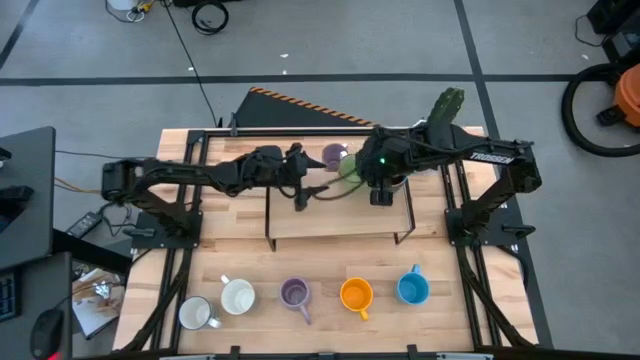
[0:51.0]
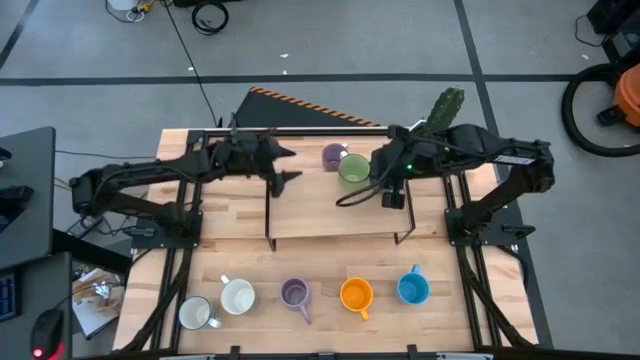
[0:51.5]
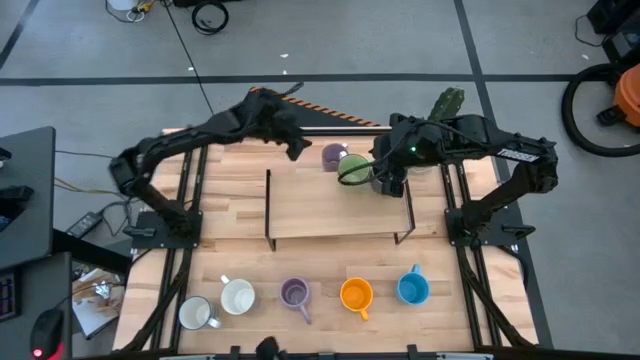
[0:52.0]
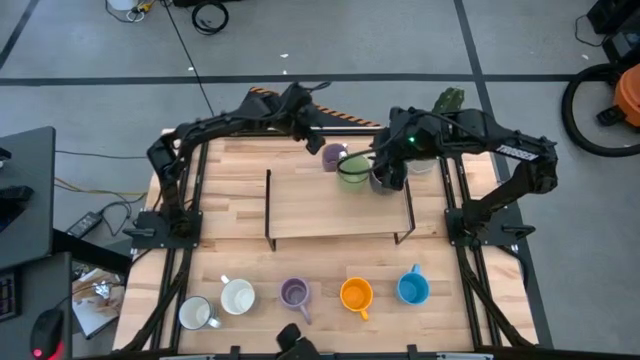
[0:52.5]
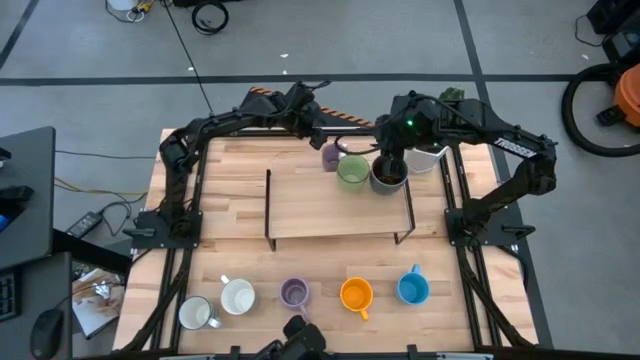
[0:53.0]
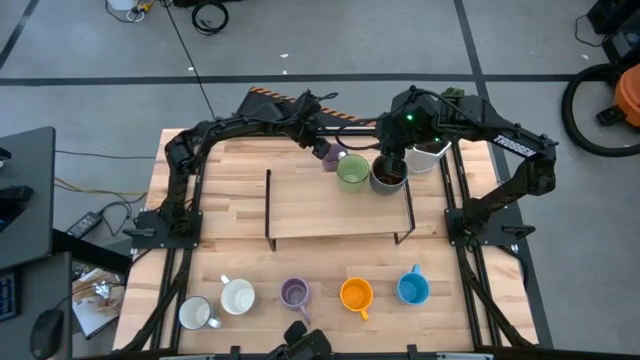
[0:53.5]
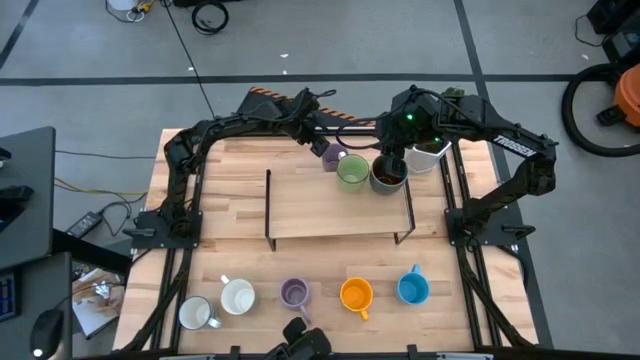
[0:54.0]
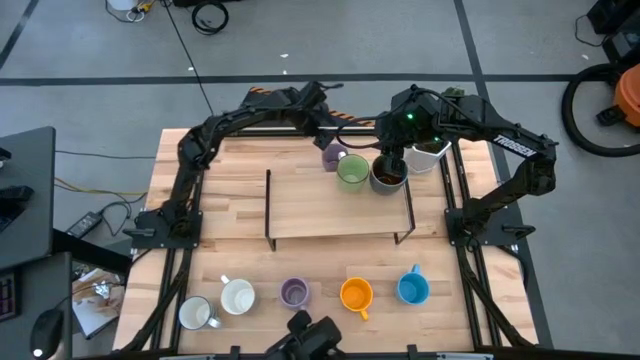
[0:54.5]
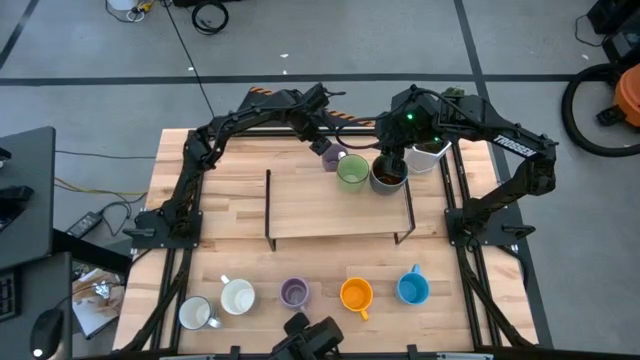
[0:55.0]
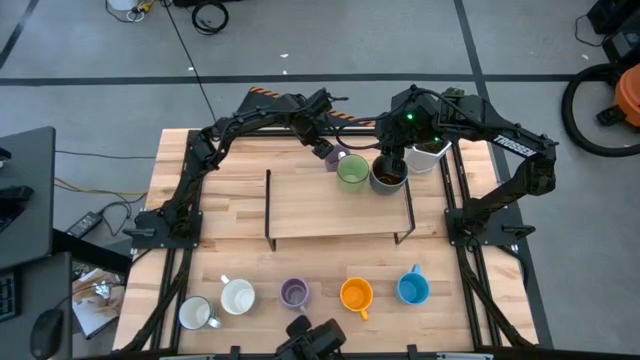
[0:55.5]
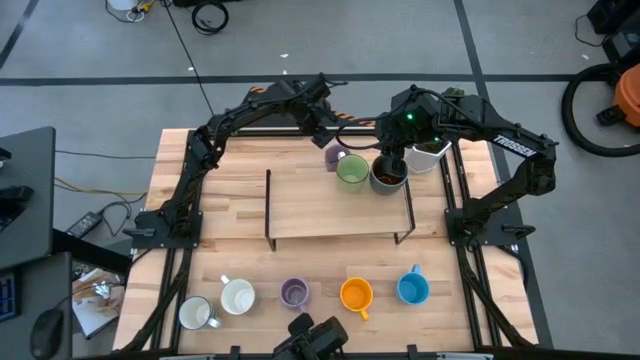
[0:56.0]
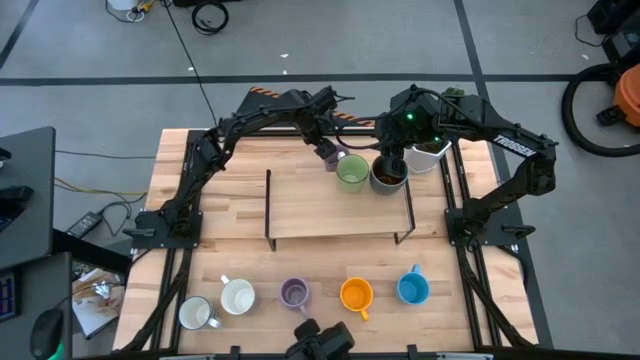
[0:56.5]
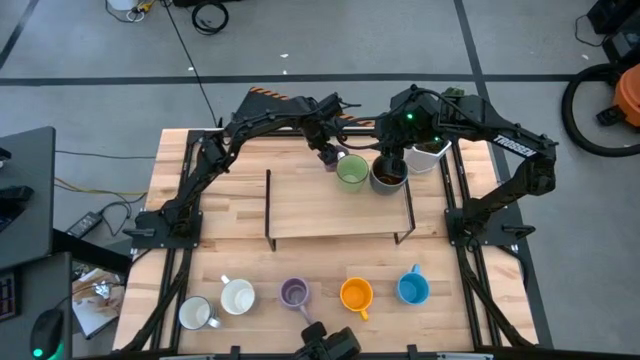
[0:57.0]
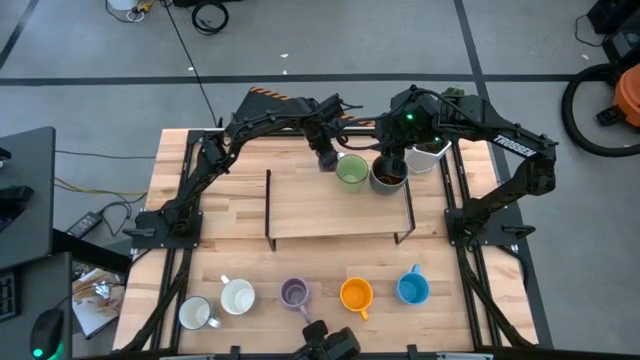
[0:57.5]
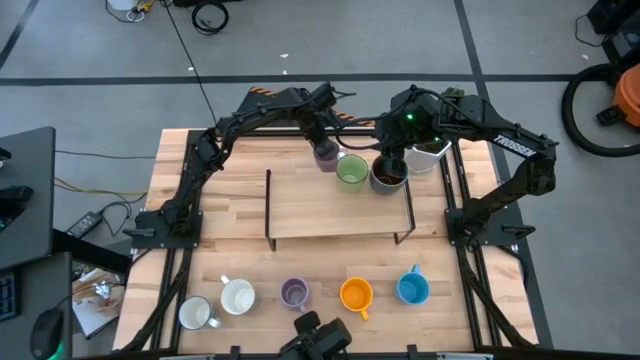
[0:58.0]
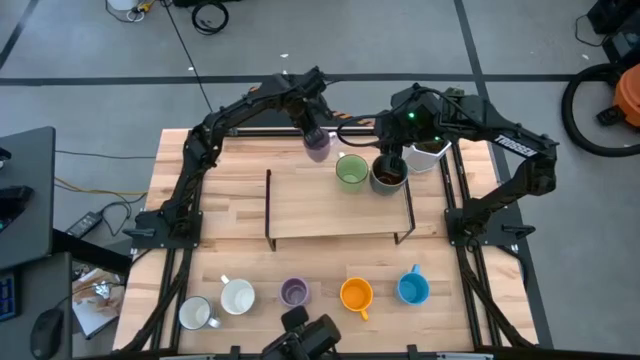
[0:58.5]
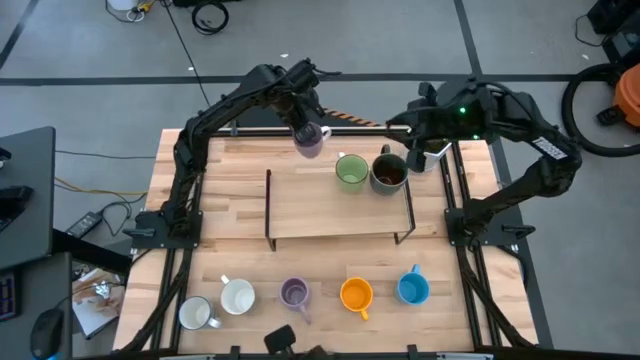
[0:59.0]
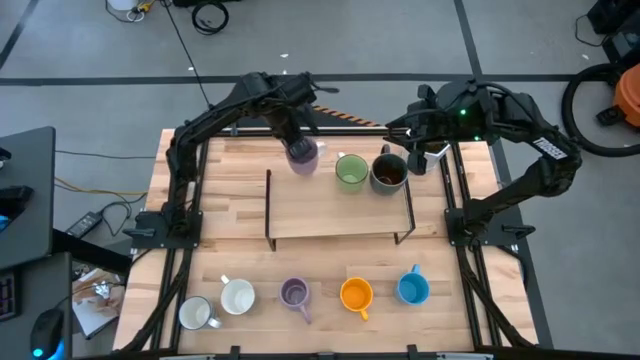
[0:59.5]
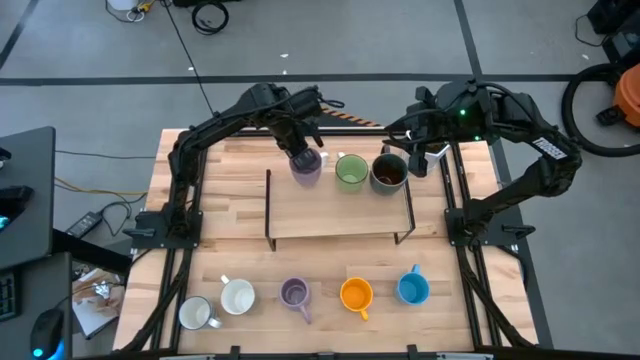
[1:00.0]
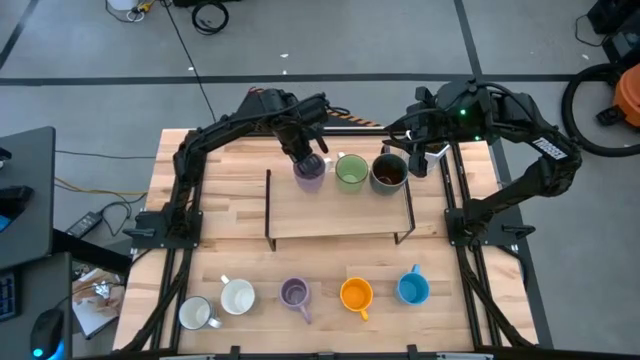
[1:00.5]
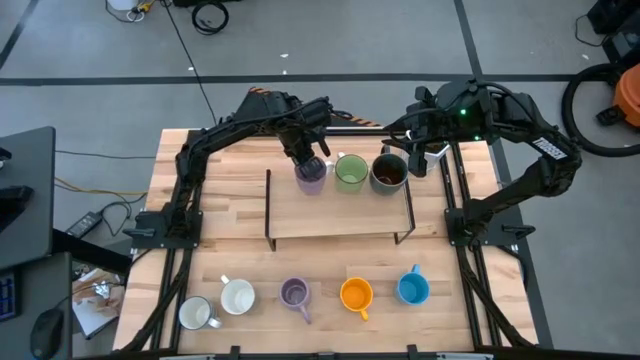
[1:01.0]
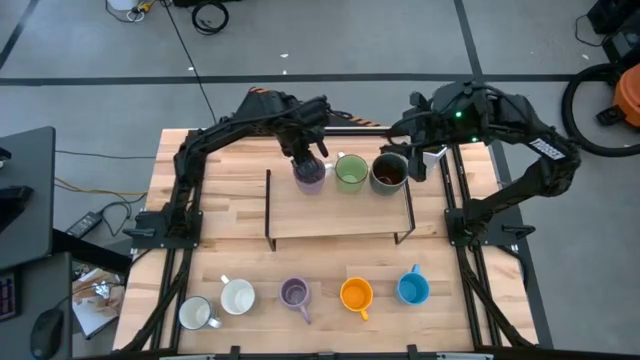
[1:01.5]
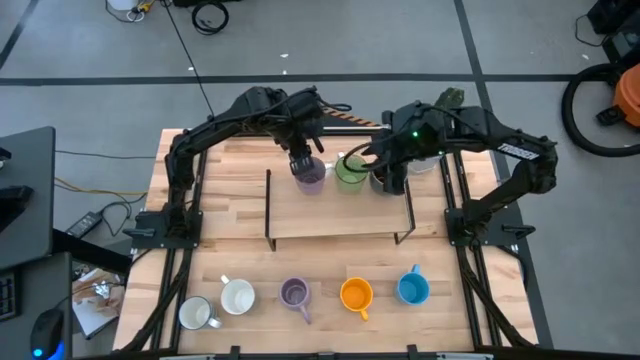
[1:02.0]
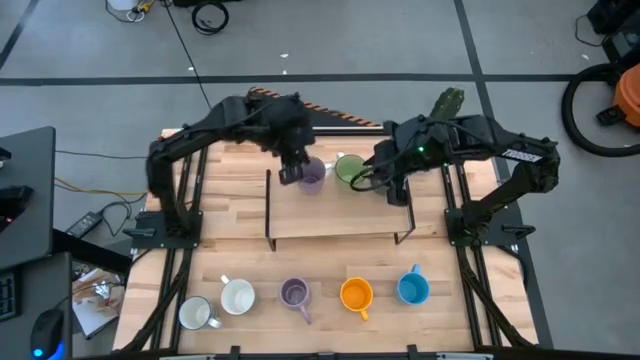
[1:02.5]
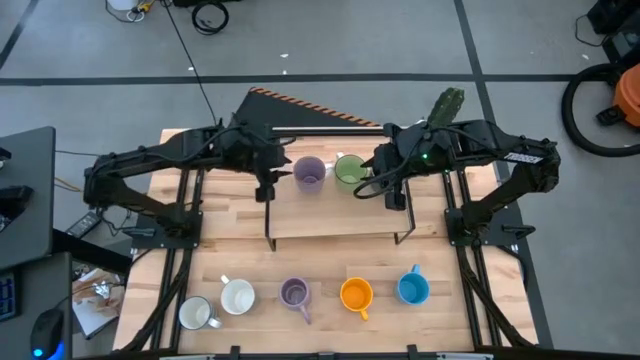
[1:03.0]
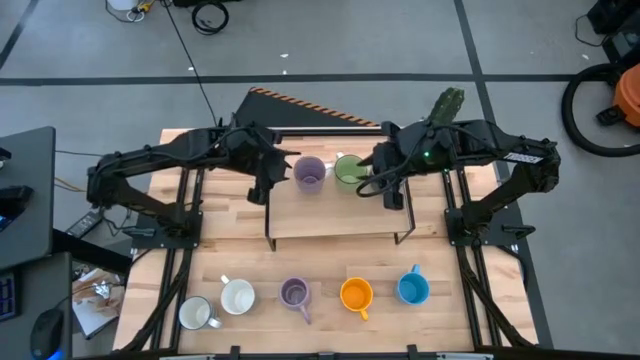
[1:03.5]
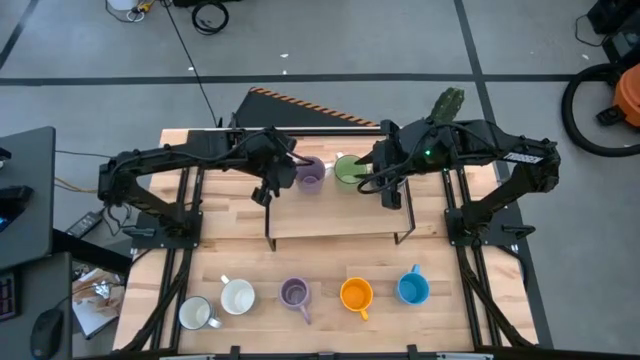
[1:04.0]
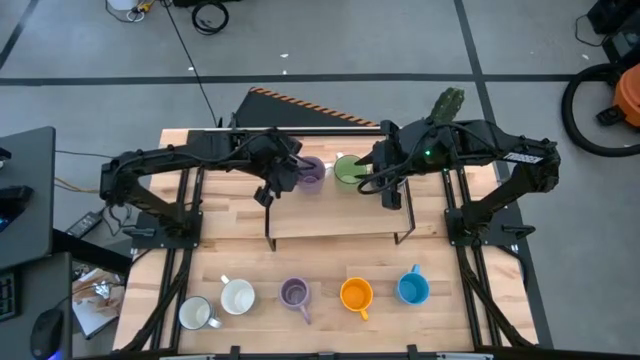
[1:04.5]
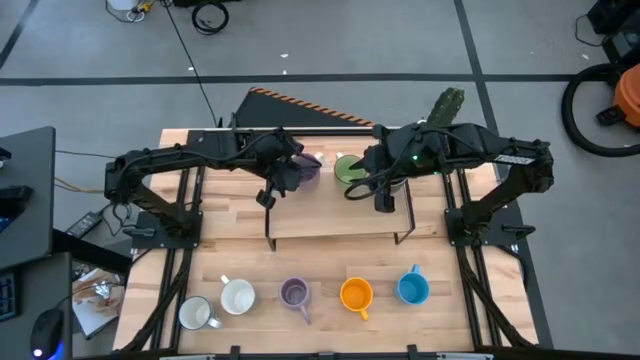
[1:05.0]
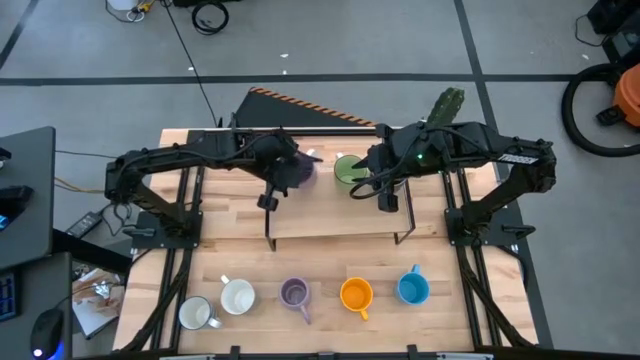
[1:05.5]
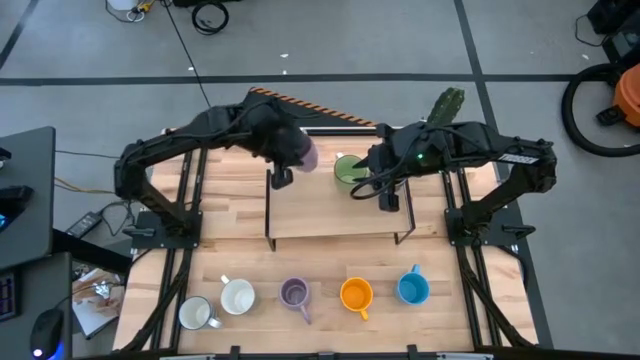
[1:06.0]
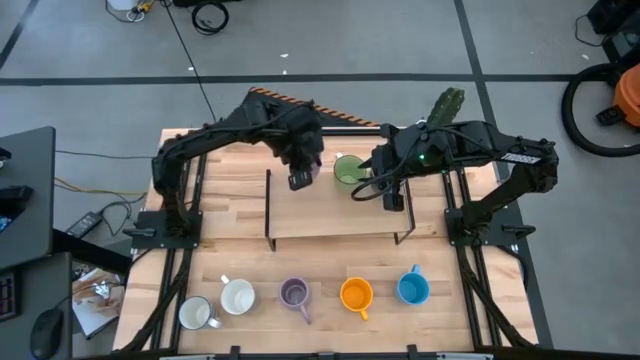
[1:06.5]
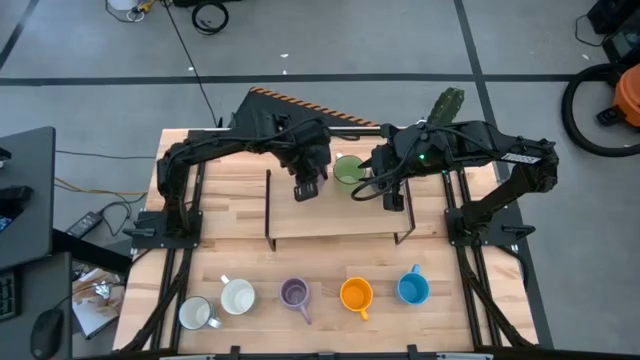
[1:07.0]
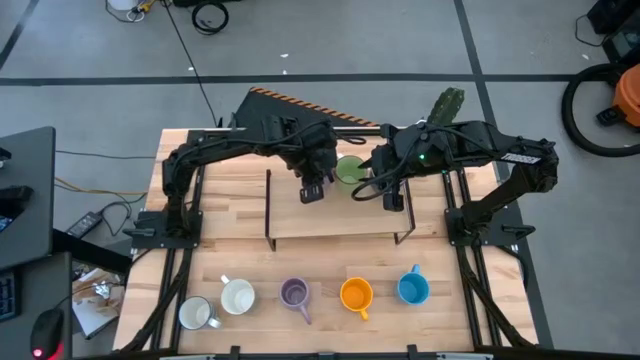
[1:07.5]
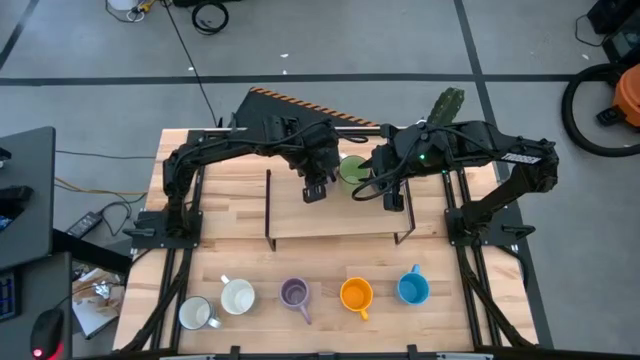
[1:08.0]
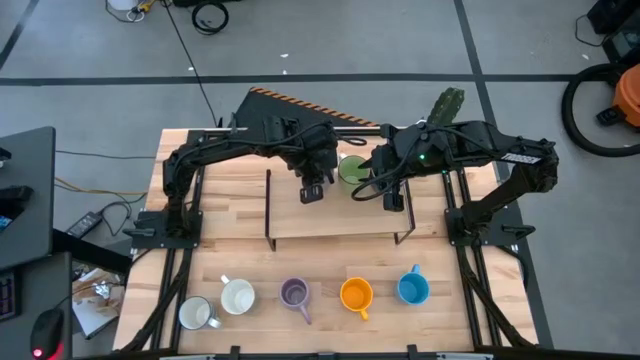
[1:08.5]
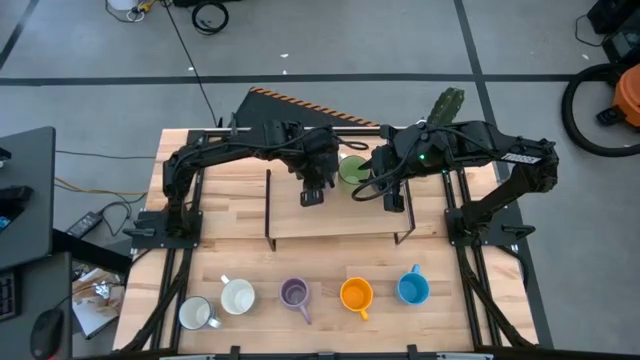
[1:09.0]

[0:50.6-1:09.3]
Task: Place coffee mugs
Put the top purple mug on the shelf
